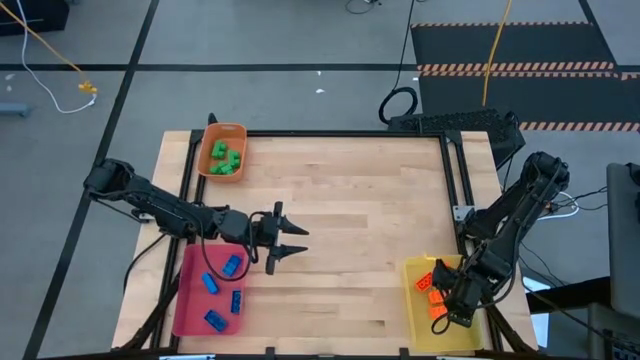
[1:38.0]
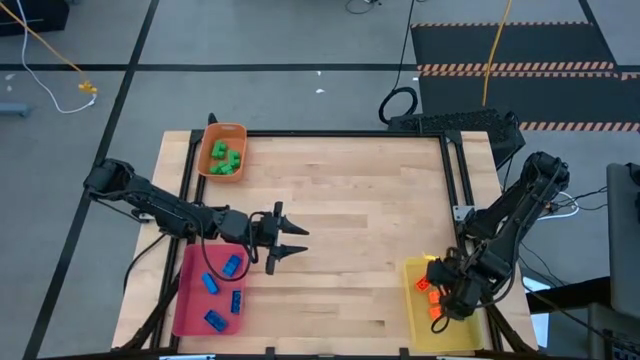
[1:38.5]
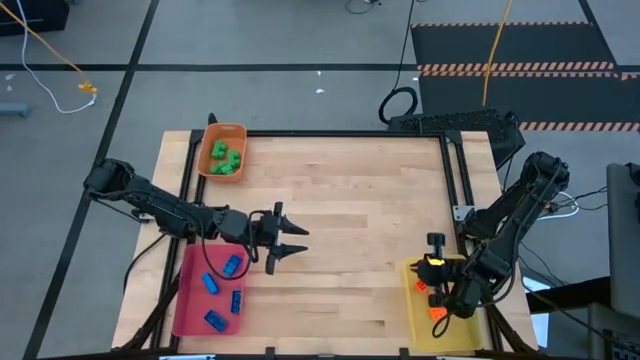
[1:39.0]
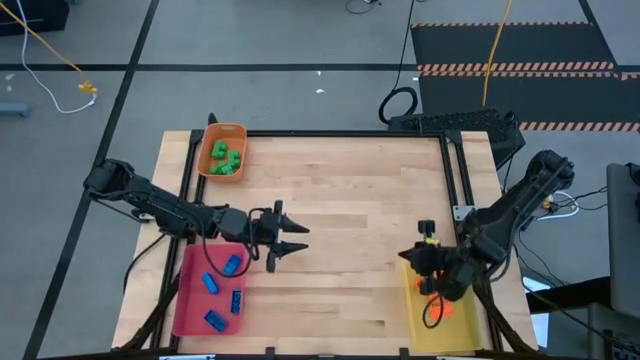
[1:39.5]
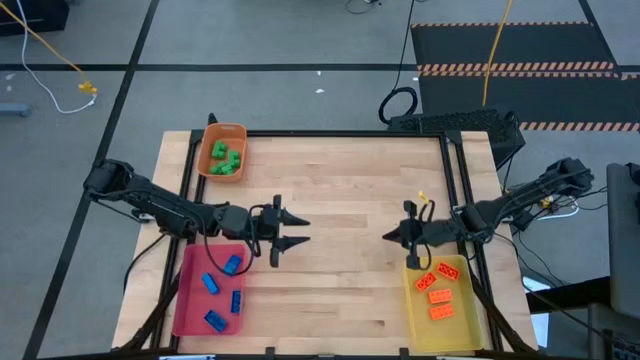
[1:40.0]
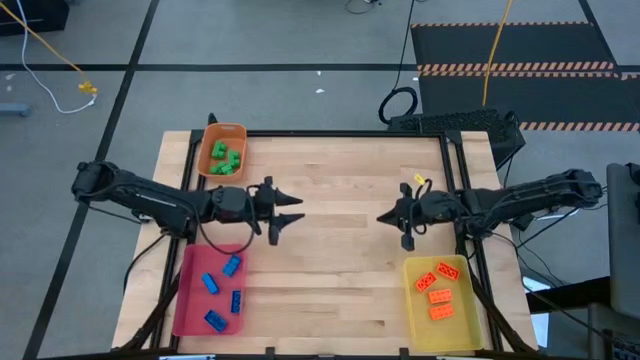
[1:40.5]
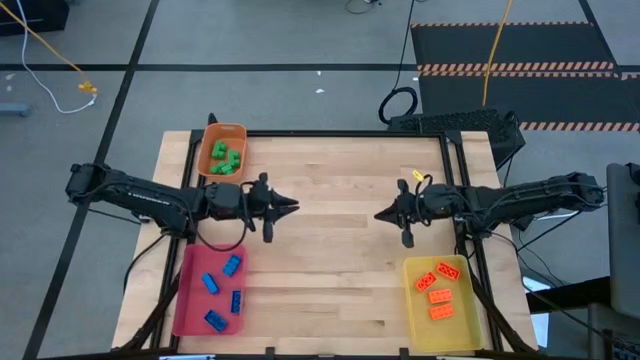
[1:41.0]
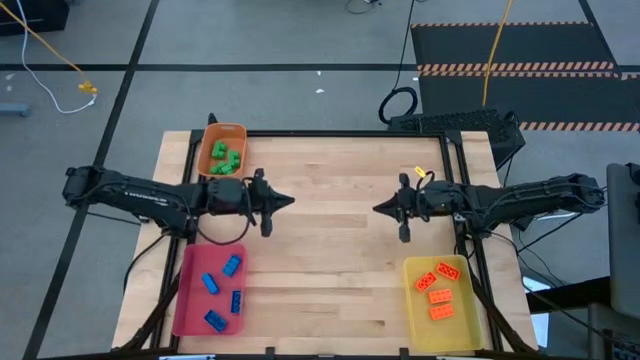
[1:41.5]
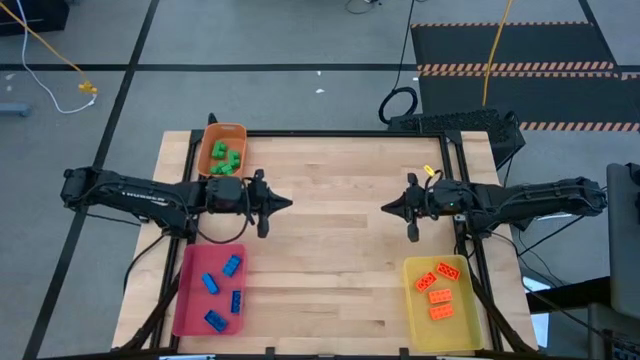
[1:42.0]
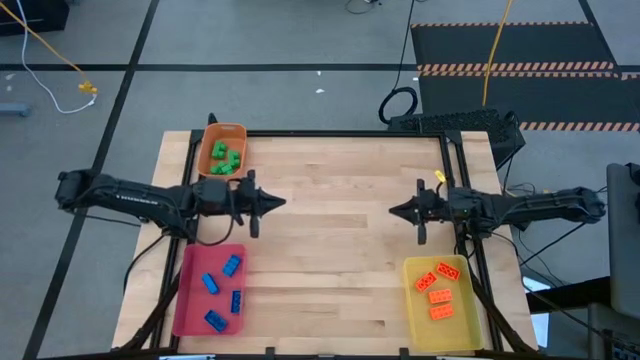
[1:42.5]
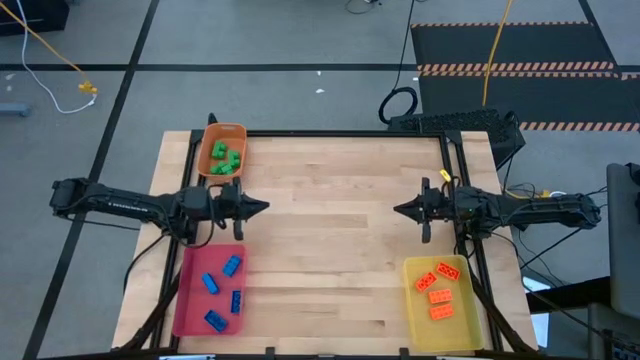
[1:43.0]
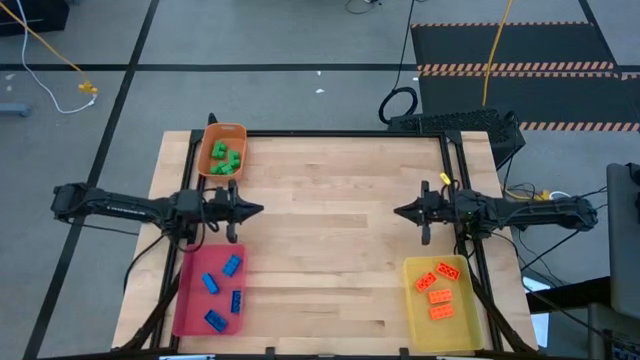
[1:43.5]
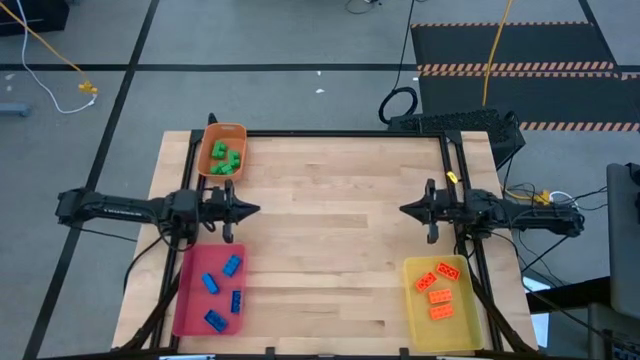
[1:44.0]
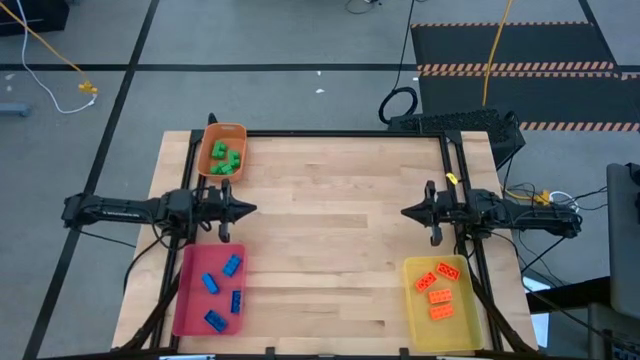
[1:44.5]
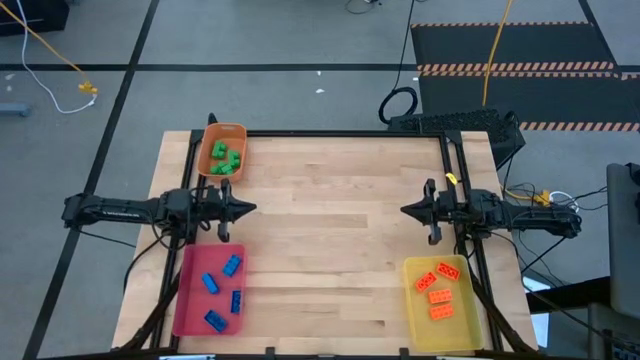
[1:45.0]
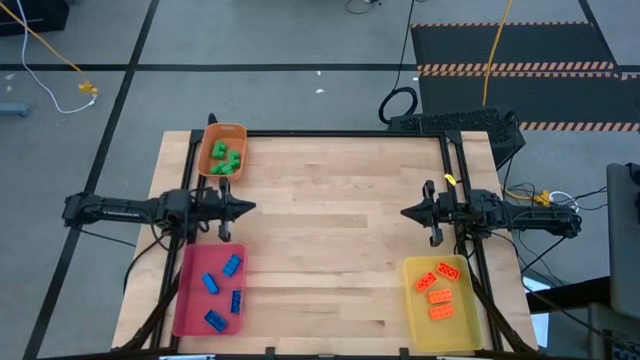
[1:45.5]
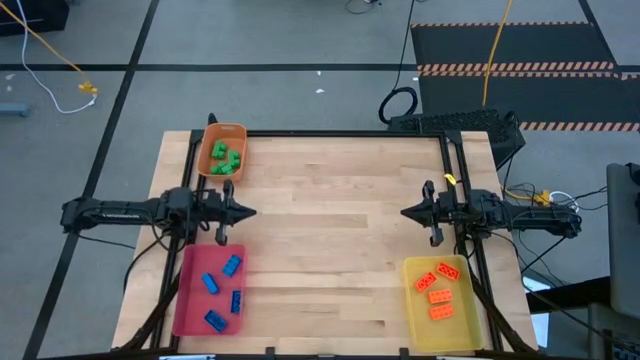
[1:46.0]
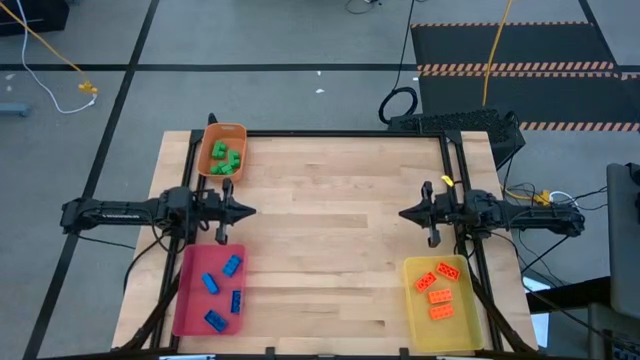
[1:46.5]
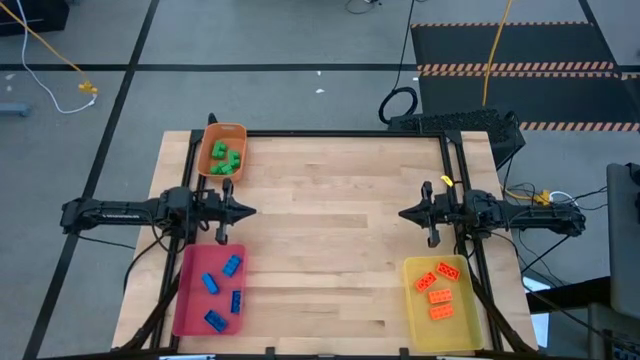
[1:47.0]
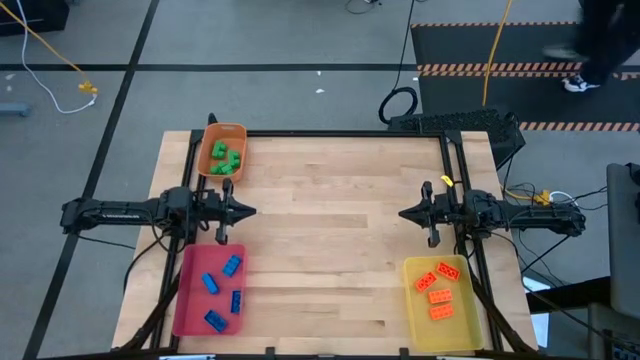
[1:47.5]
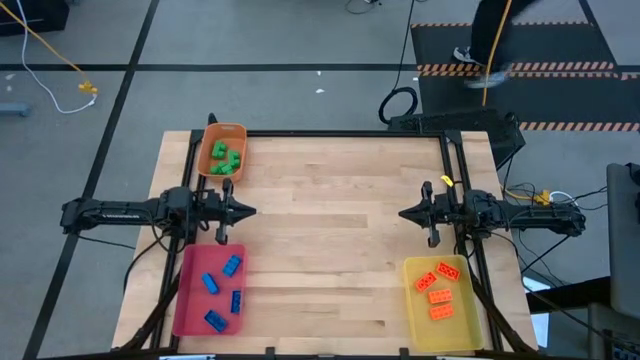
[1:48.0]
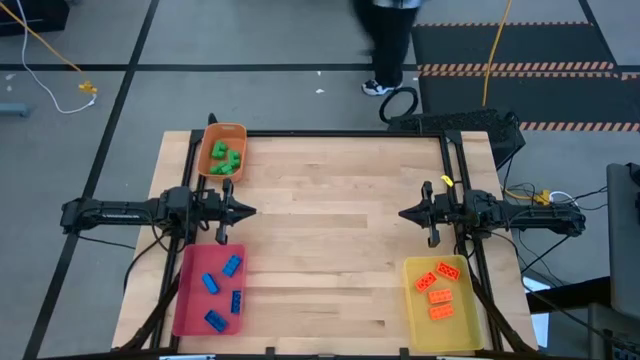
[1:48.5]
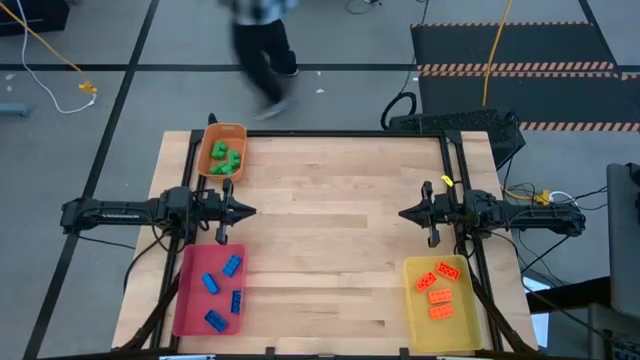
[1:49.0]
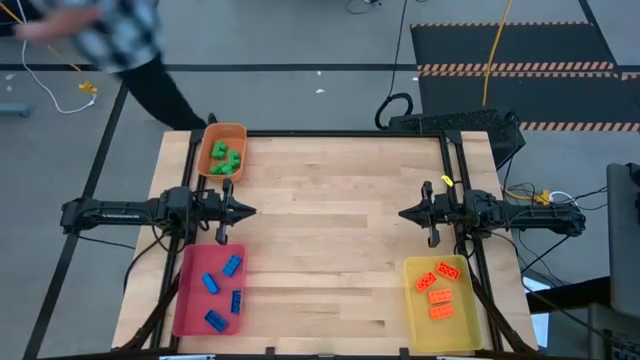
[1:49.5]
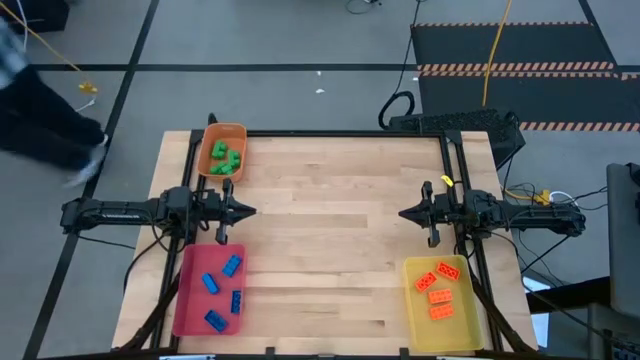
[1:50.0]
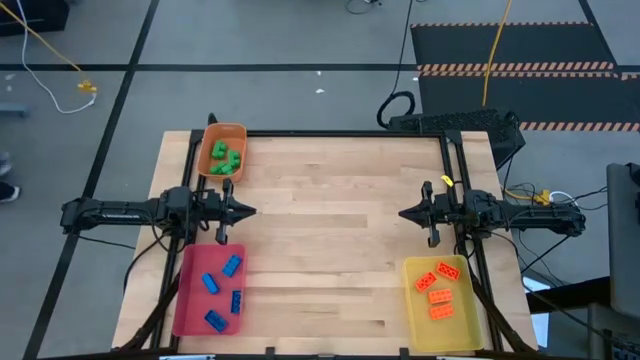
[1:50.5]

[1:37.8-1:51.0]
Task: Sort & place blocks by color
Return to Home Position

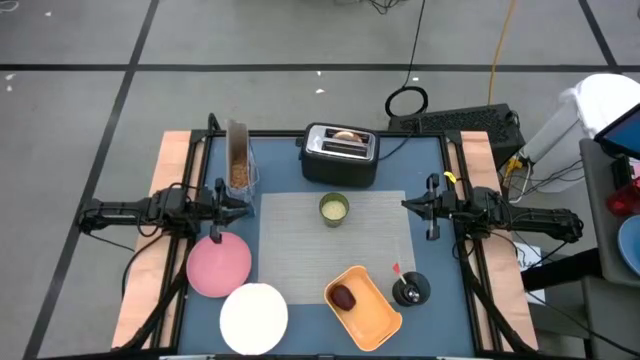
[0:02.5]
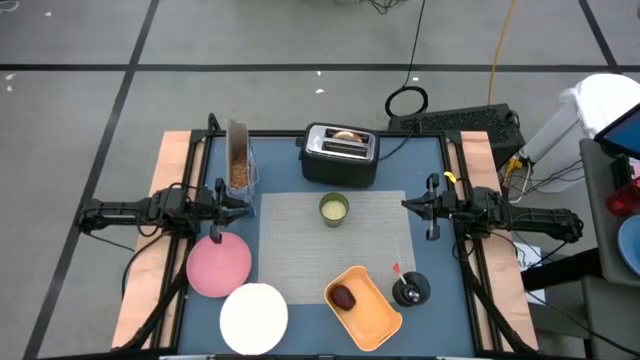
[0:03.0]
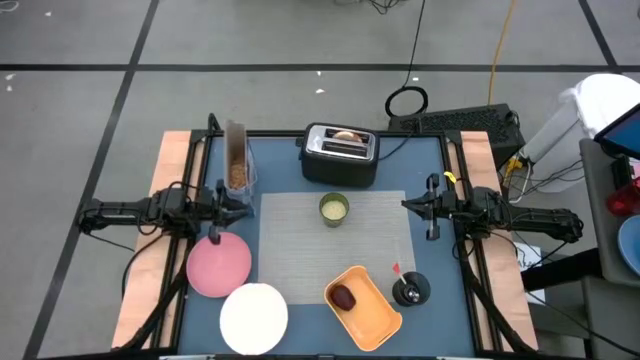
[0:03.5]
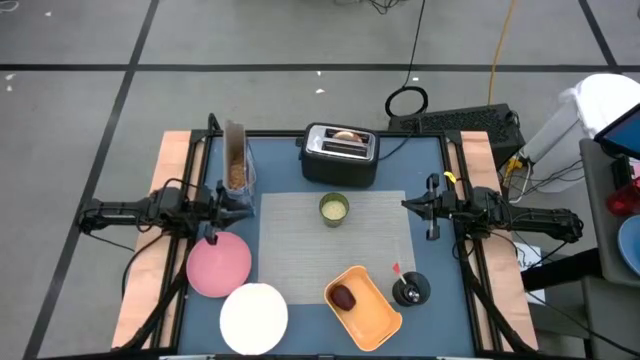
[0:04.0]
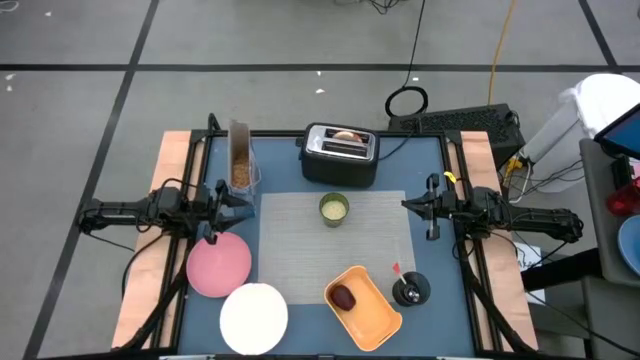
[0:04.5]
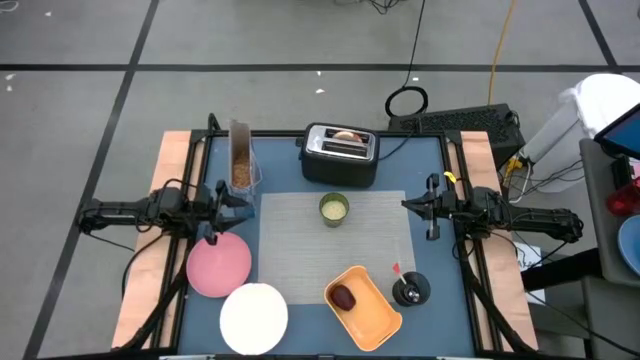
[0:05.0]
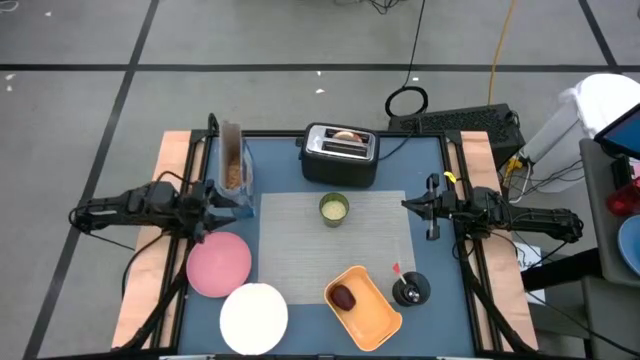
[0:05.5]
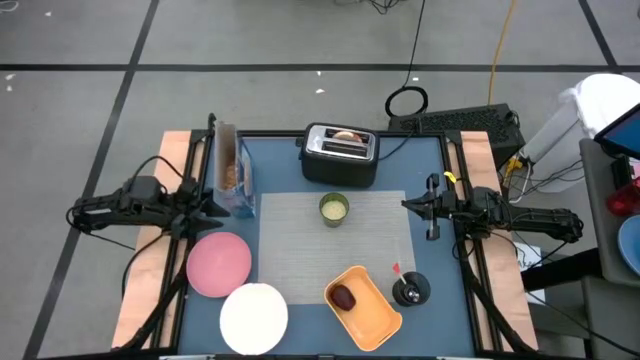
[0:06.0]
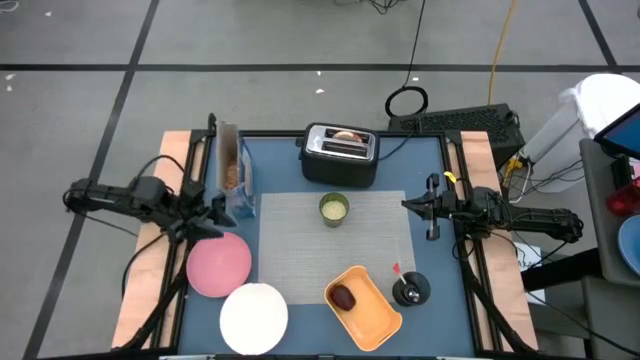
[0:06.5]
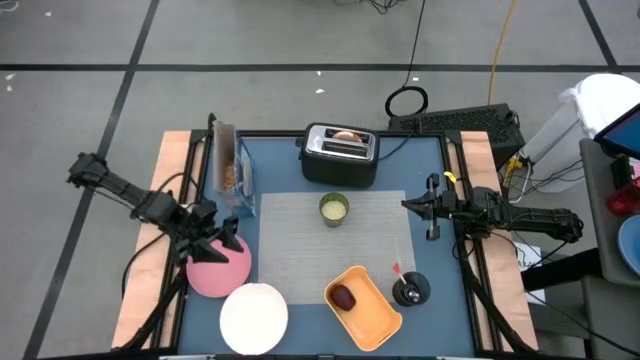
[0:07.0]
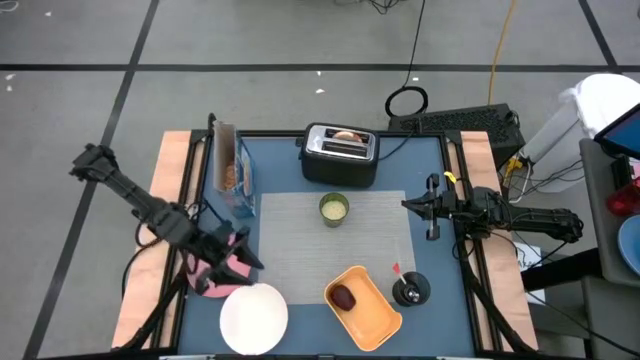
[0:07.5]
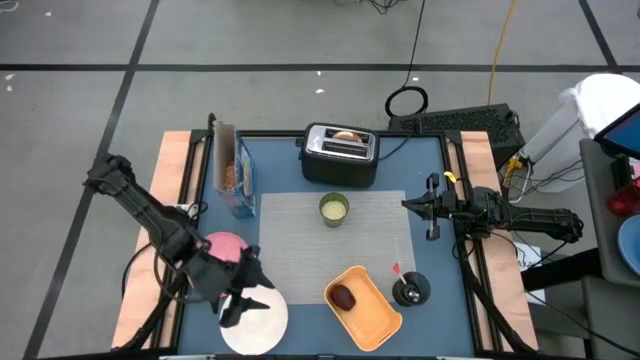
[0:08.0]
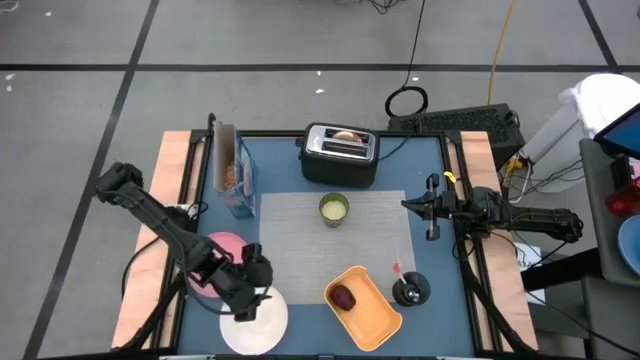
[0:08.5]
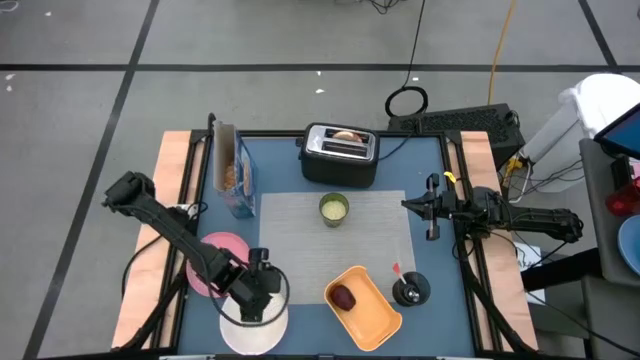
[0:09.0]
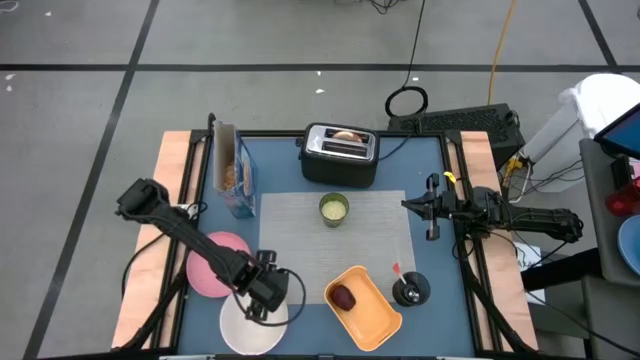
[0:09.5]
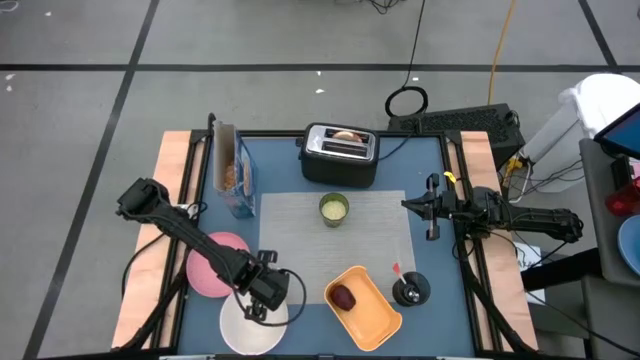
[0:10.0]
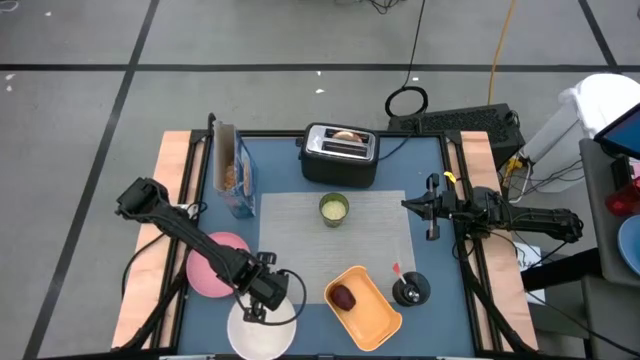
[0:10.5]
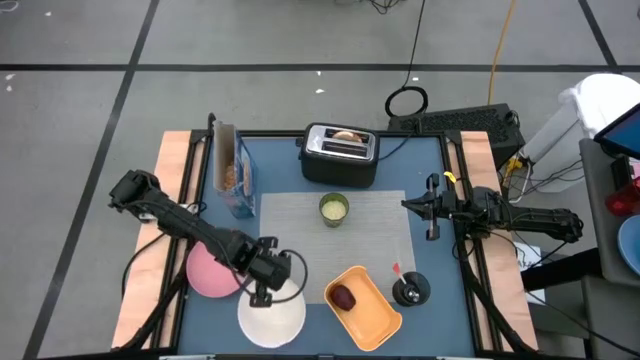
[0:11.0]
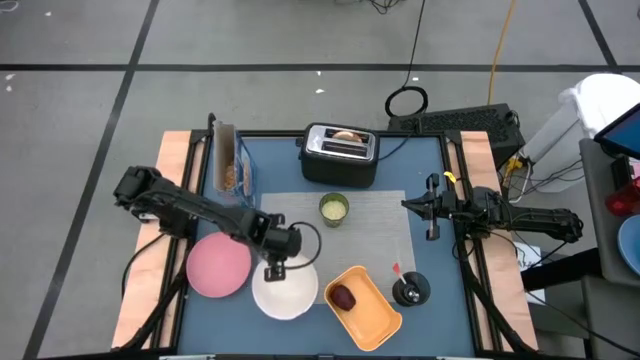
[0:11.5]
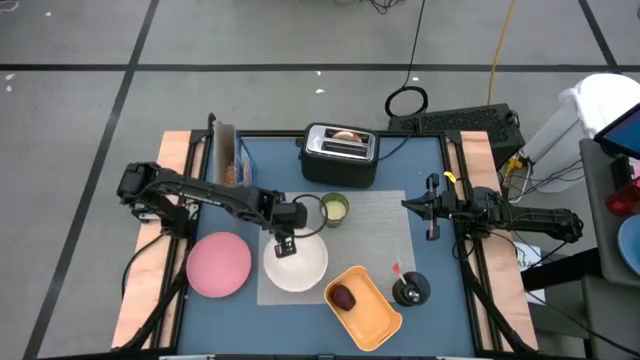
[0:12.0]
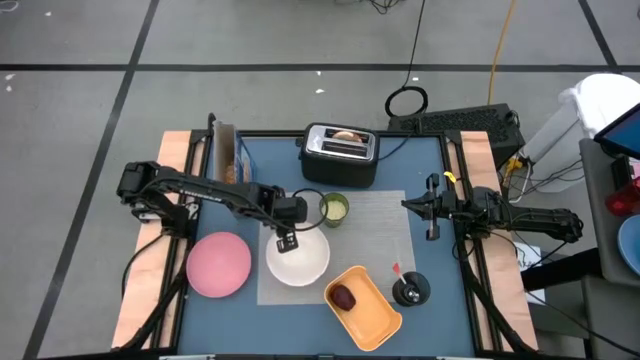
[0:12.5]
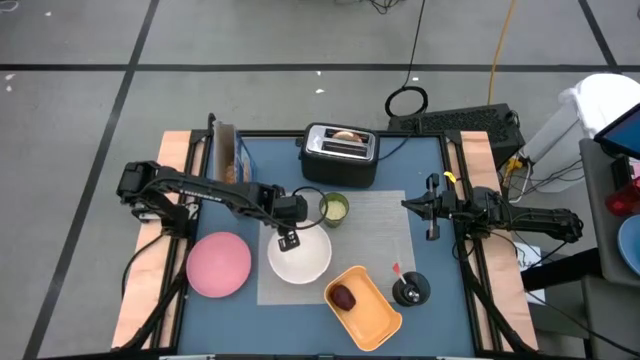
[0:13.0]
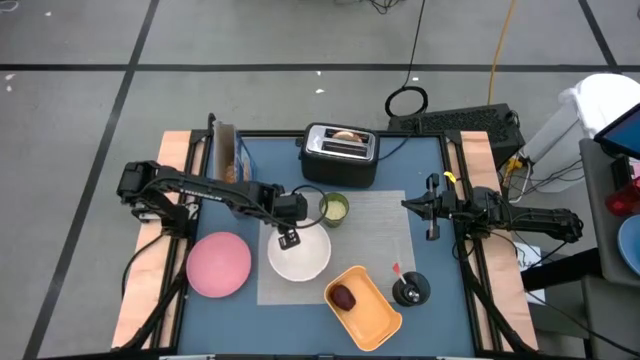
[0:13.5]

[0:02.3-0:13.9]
Task: Arrange a breakfast setting
Put the white bowl on the gray table mat to the bottom left of the green cup
